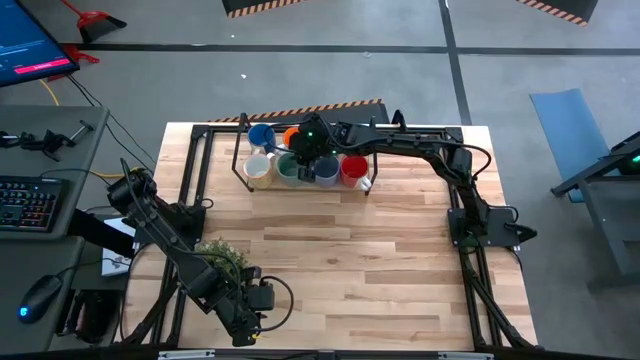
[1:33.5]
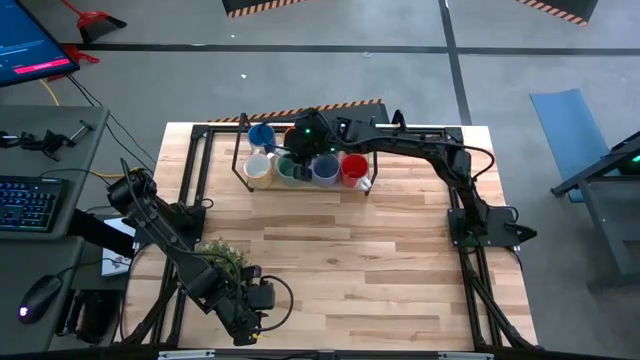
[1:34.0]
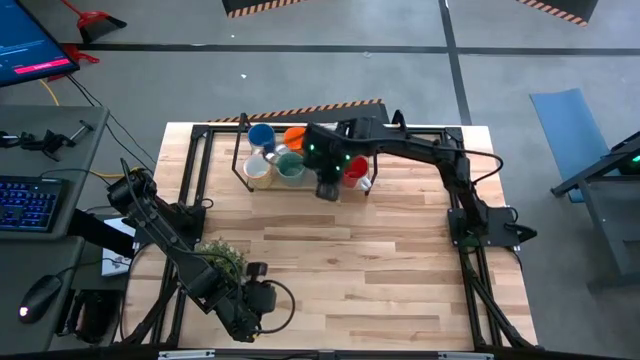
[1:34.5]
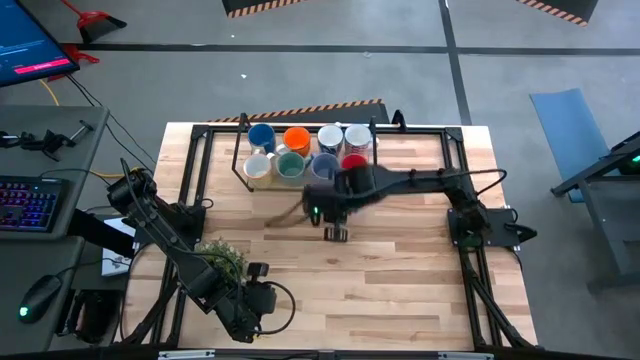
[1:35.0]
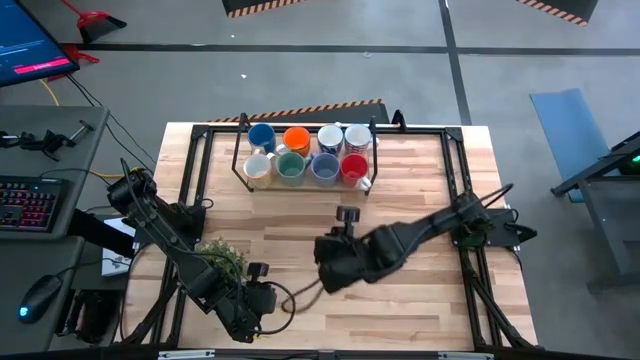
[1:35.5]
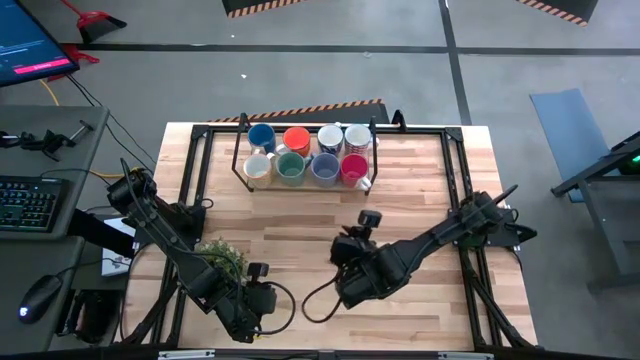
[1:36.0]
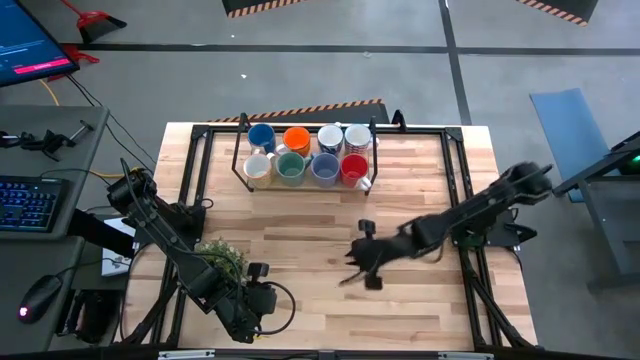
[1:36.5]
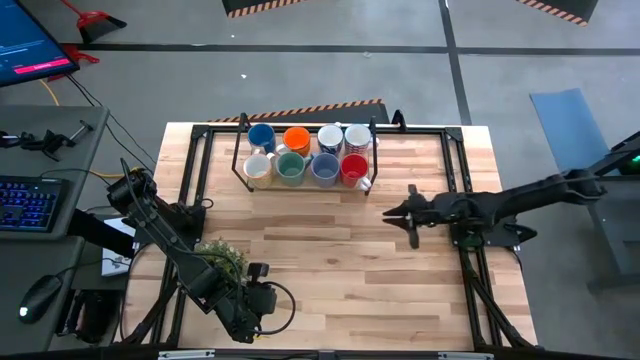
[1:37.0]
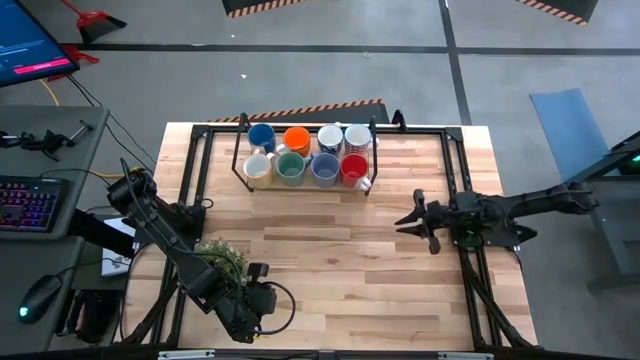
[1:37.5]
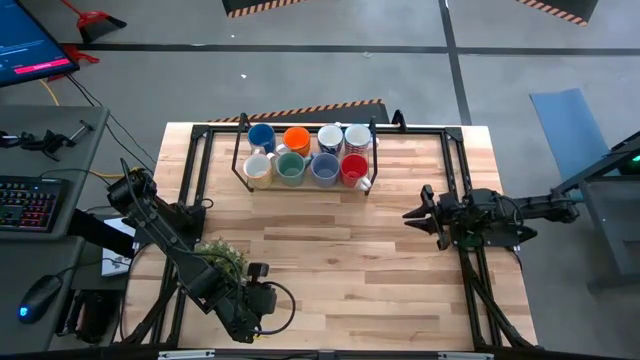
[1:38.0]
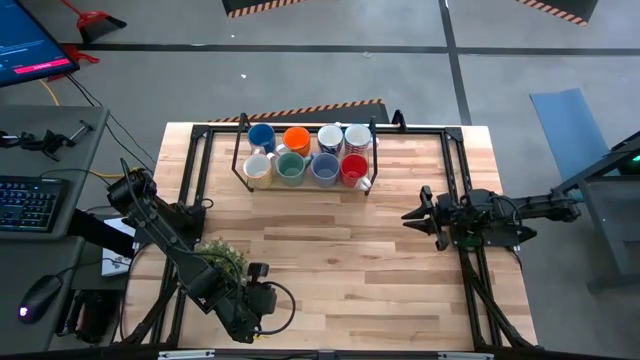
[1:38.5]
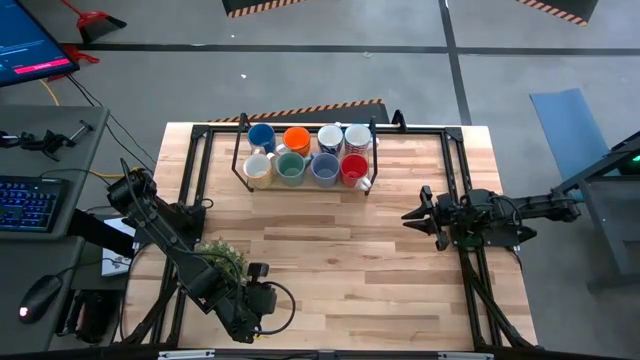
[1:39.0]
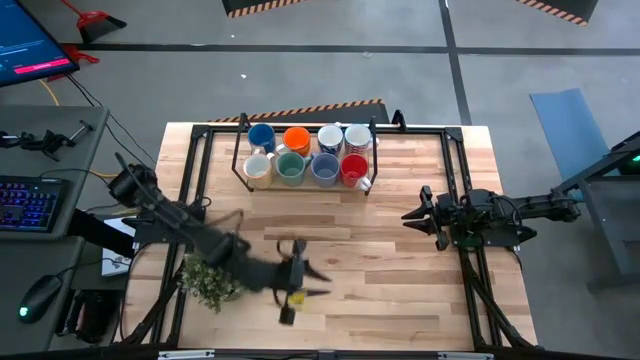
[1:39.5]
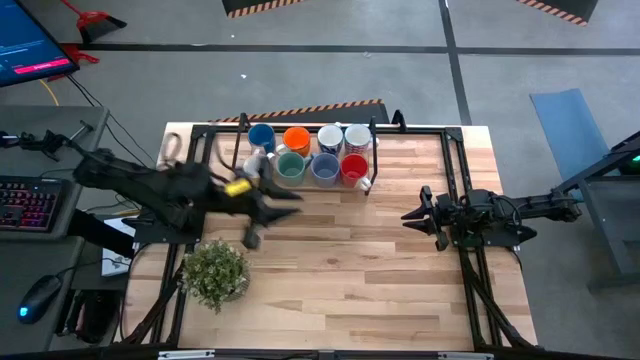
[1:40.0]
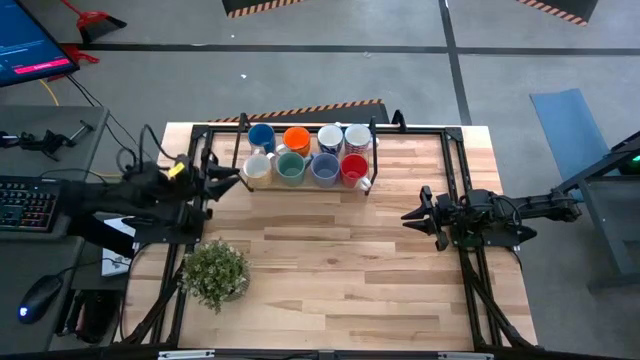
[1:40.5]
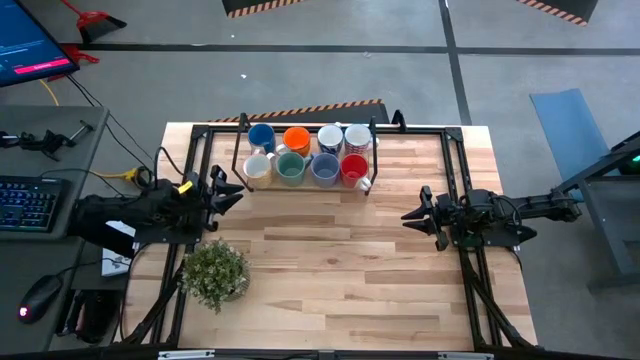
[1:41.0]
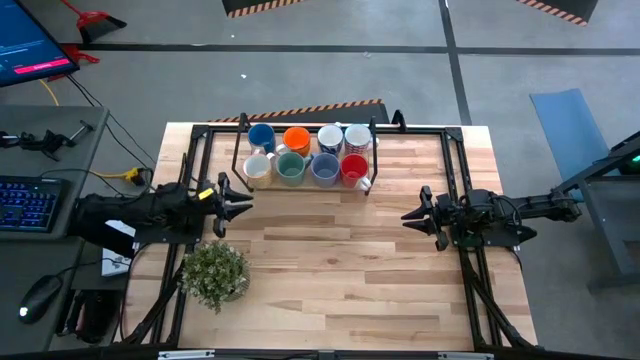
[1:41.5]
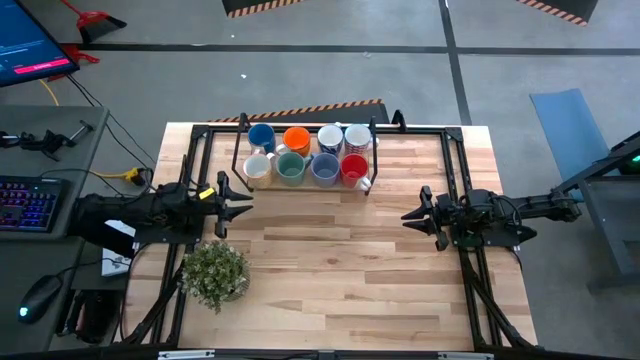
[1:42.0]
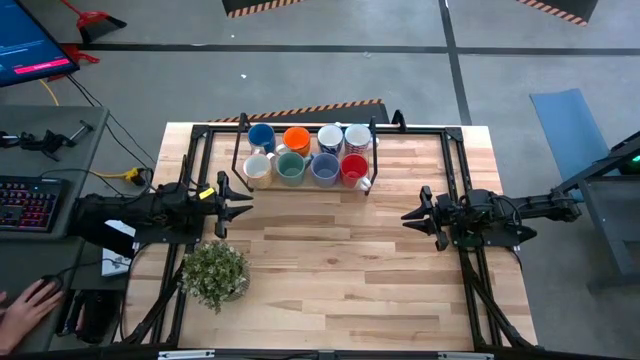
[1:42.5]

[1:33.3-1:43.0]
Task: Place coffee mugs
Return to Home Position
